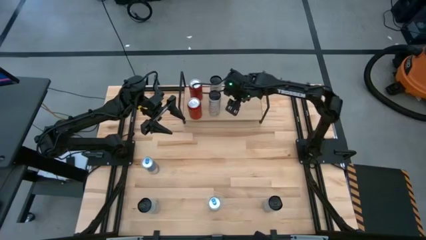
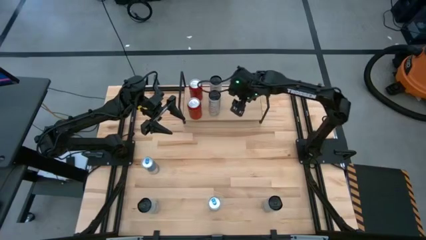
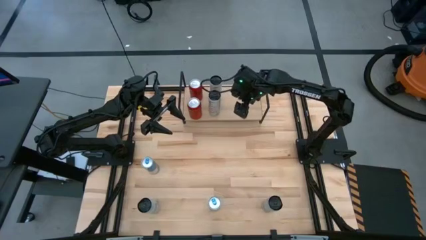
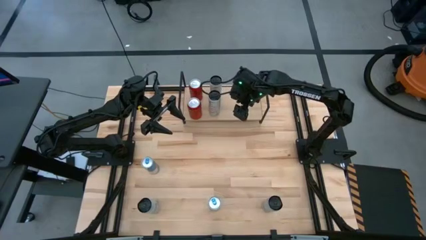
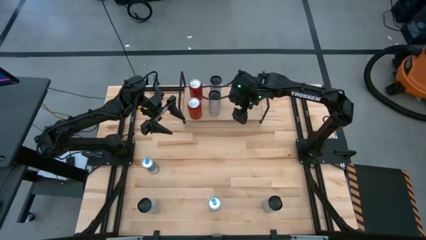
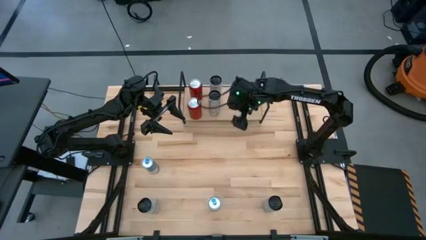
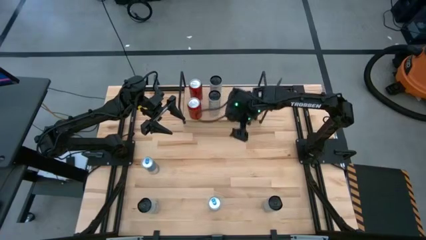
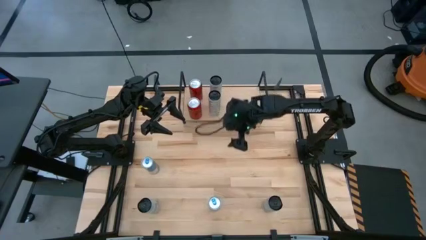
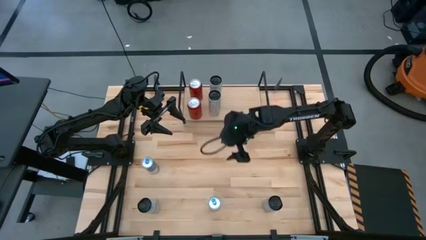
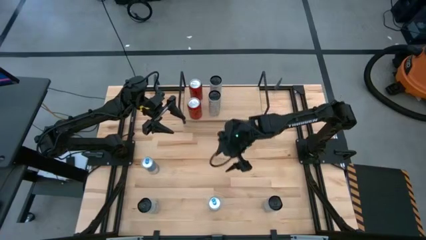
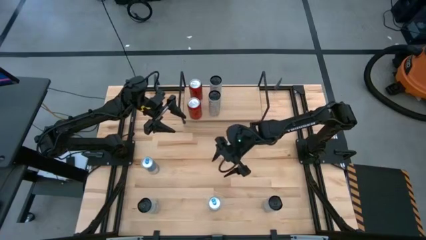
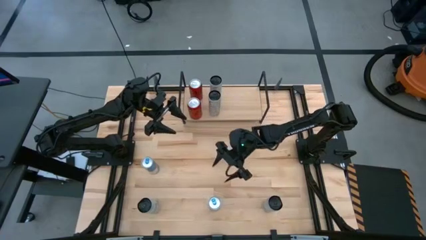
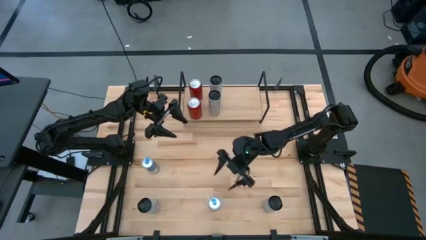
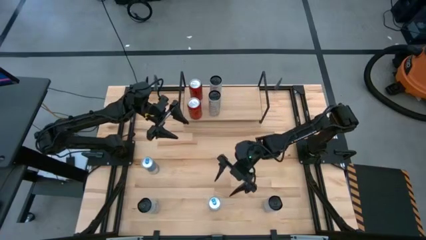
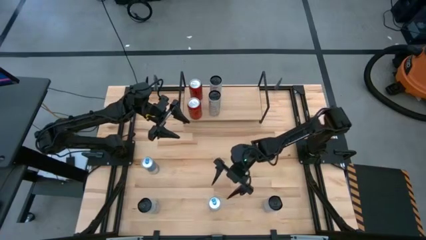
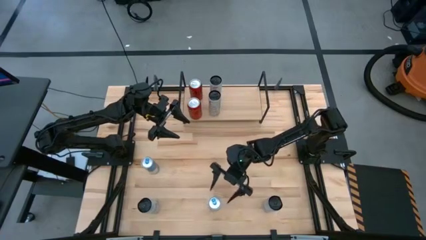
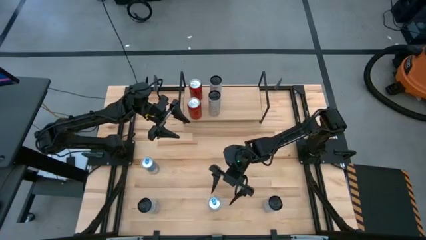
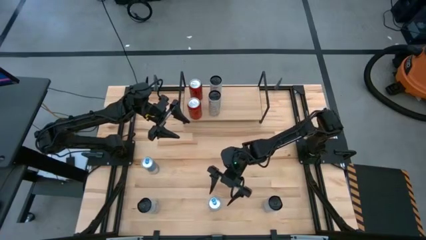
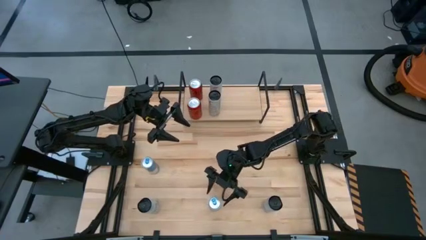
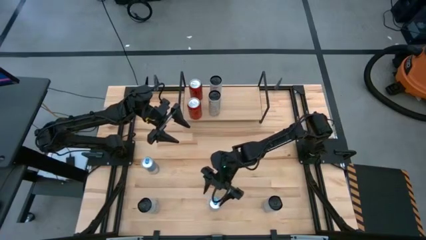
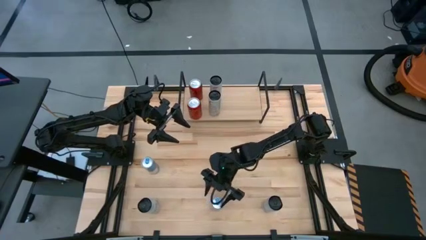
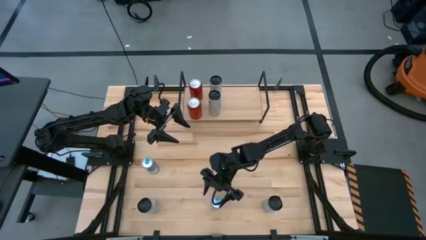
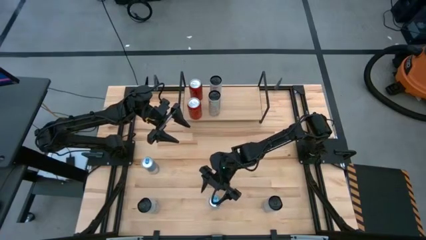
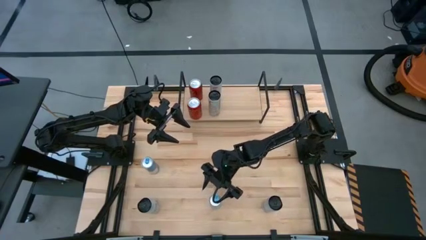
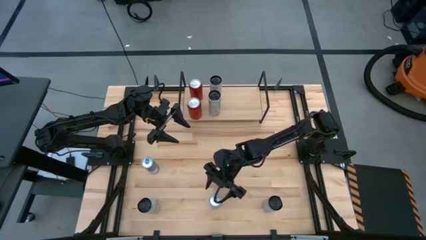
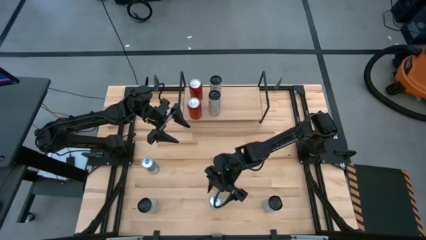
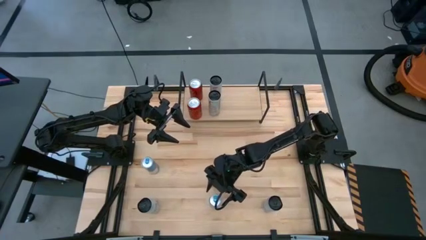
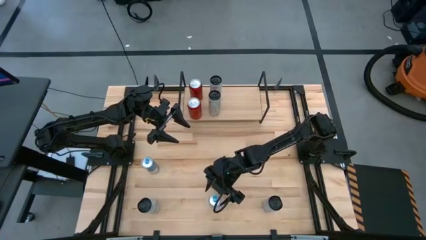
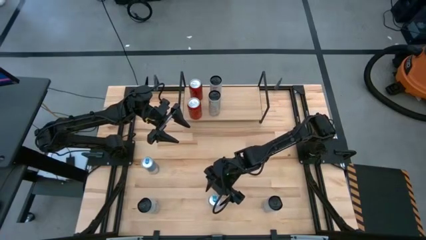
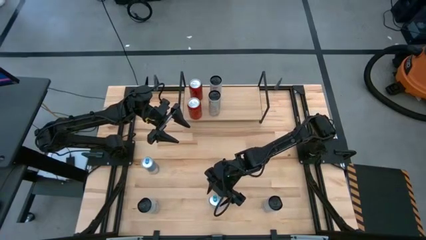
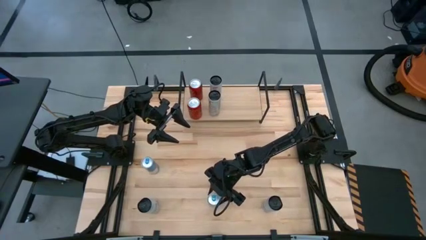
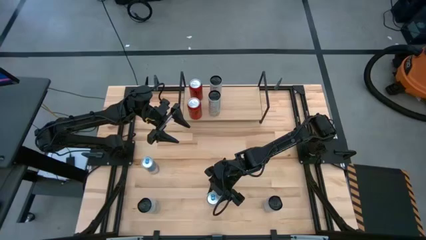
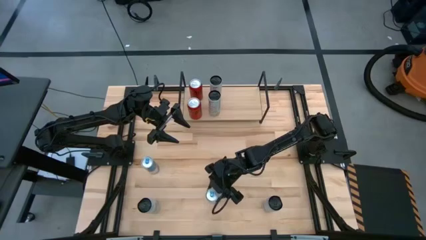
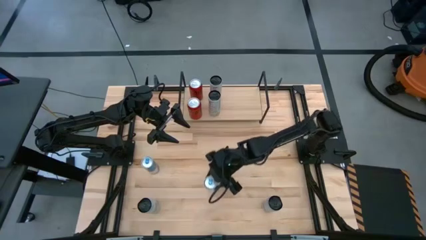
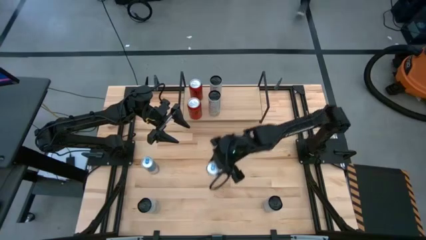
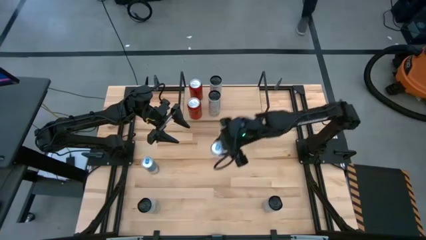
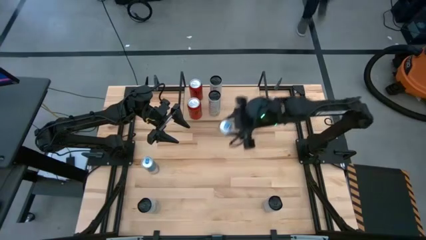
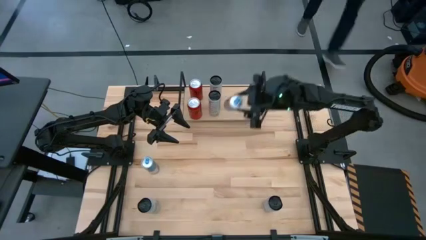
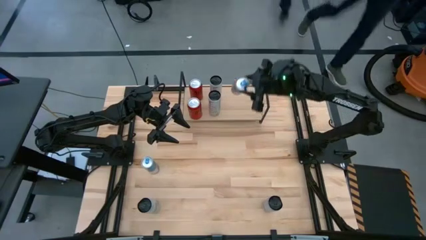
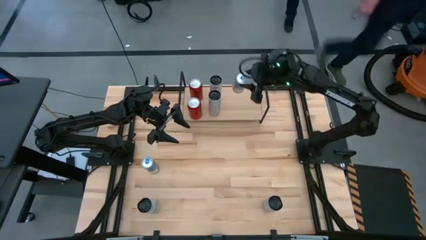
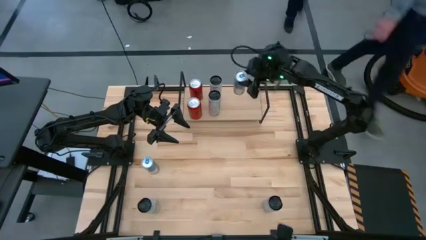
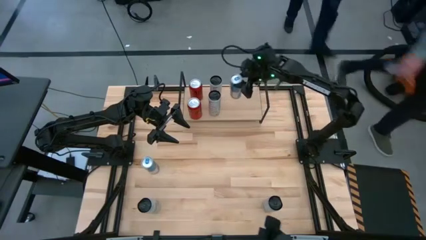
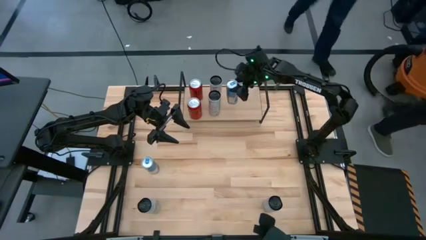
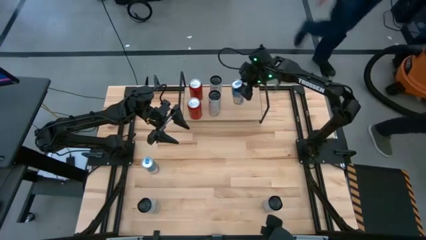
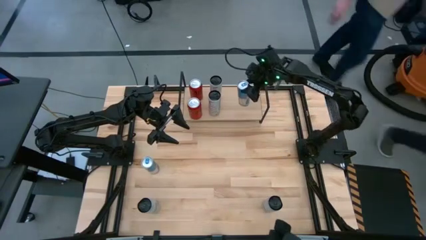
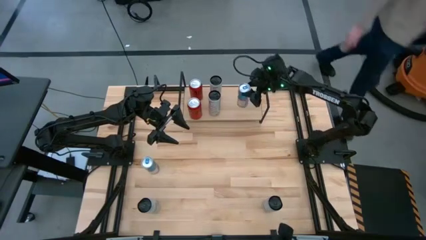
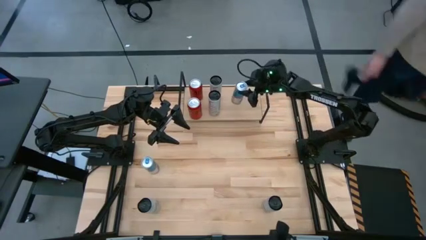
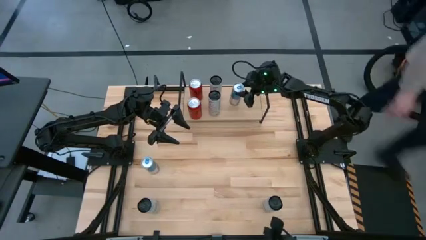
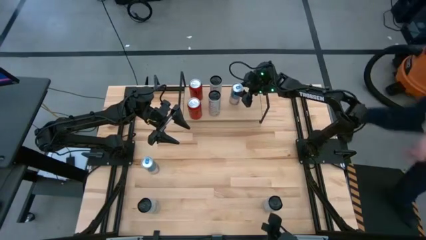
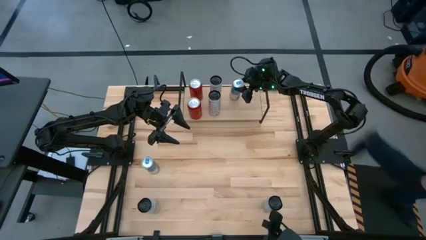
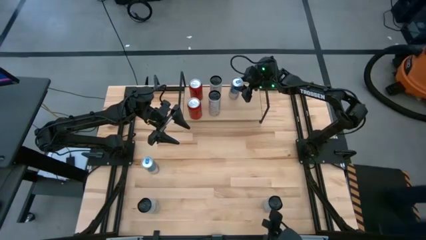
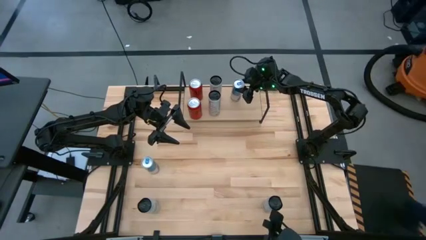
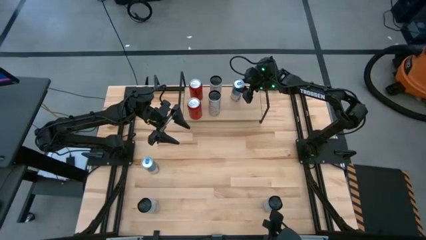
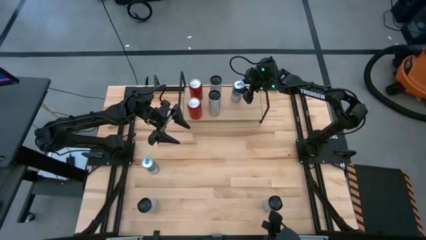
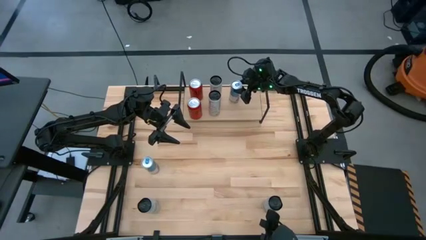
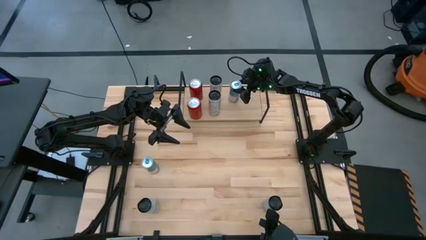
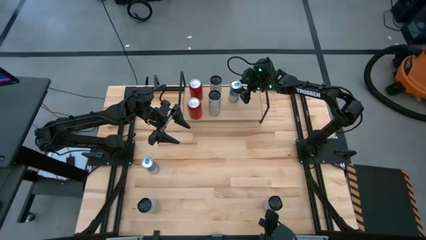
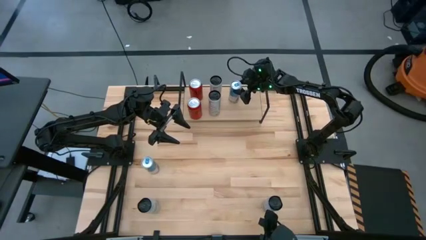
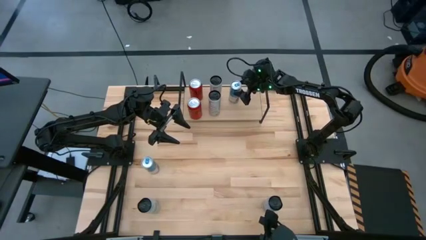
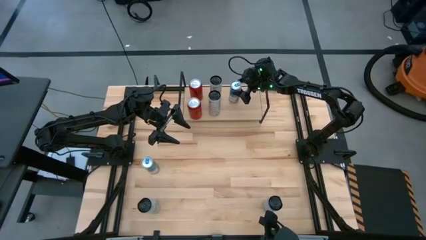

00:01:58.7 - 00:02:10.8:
Task: Place canned beverage on shelf
Put the bottom blue soda can on the shelf
